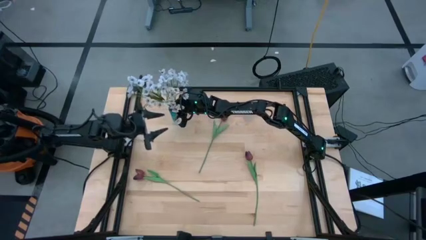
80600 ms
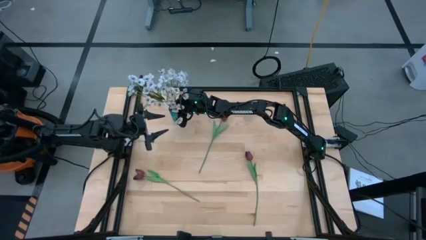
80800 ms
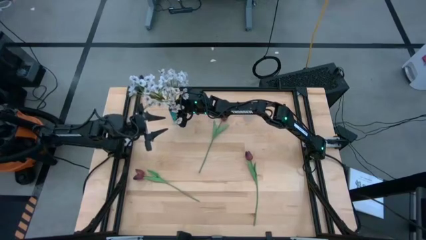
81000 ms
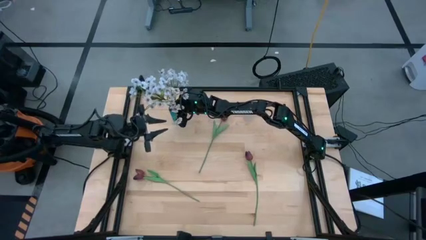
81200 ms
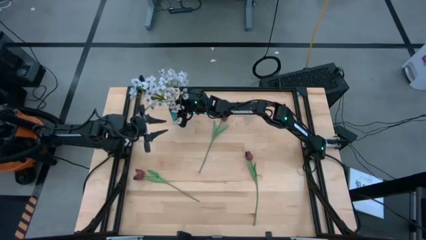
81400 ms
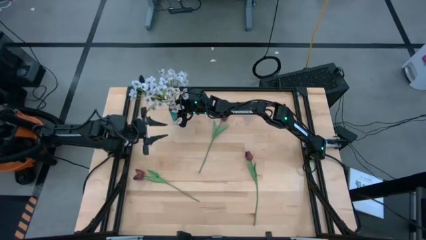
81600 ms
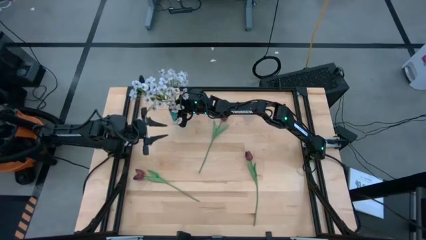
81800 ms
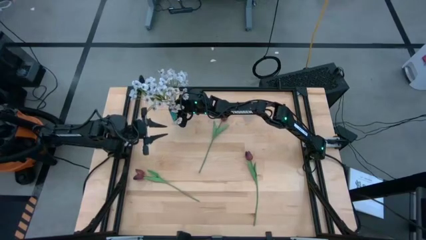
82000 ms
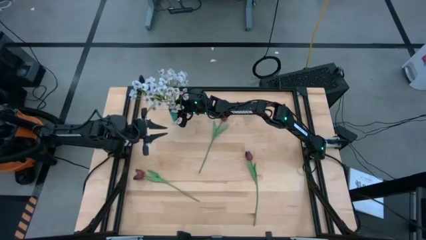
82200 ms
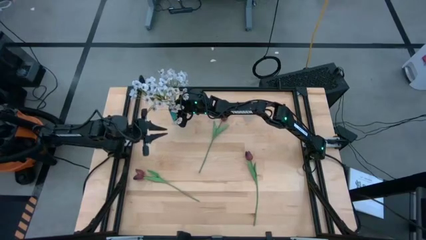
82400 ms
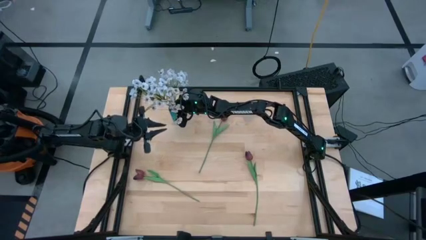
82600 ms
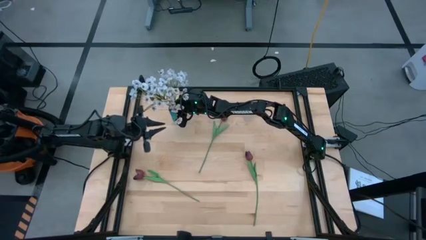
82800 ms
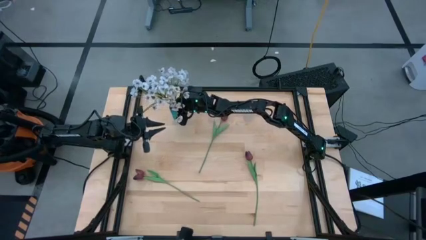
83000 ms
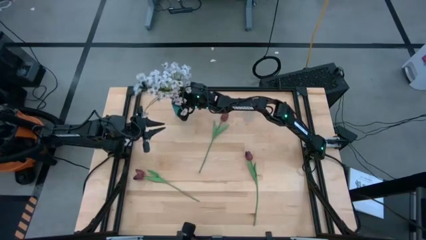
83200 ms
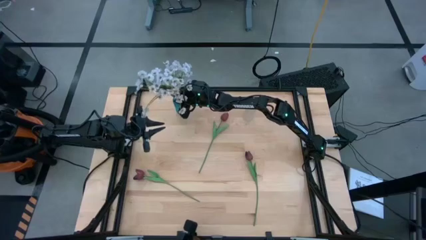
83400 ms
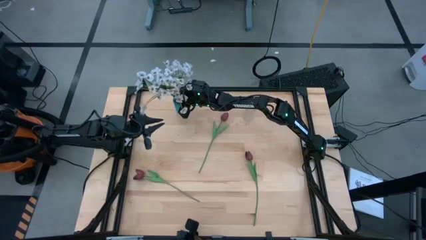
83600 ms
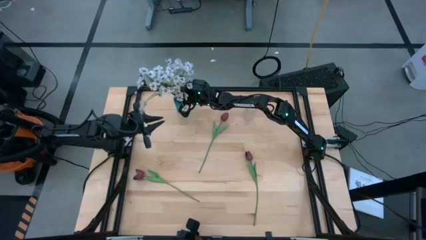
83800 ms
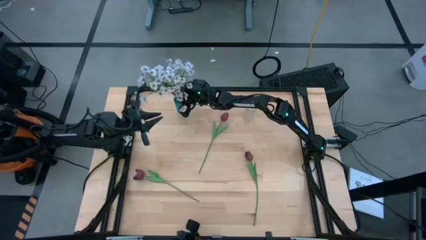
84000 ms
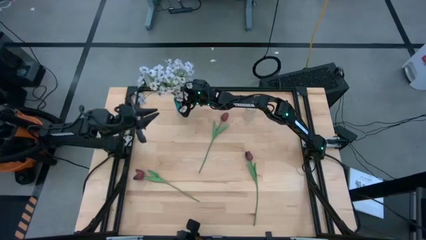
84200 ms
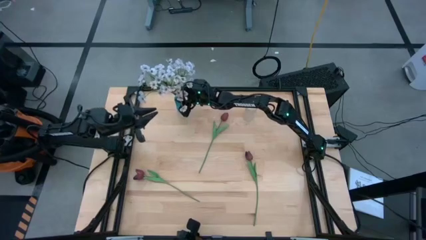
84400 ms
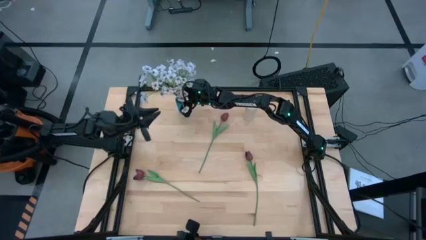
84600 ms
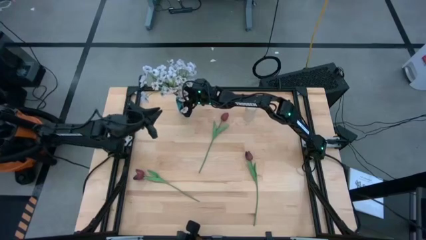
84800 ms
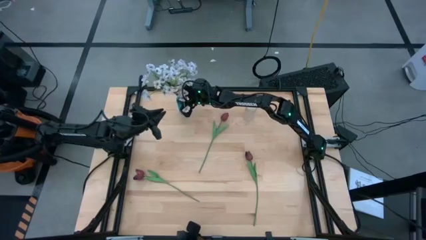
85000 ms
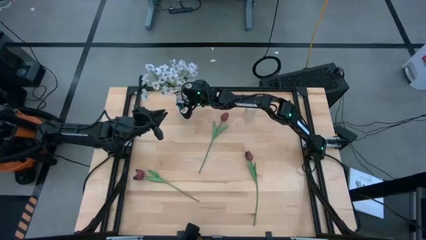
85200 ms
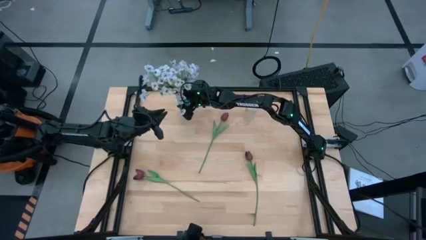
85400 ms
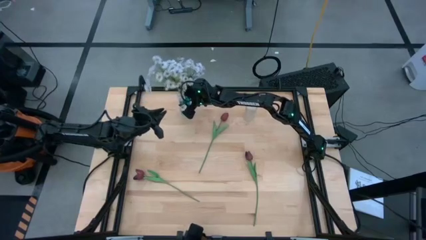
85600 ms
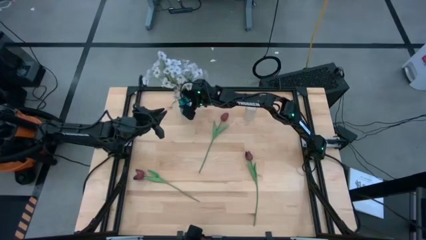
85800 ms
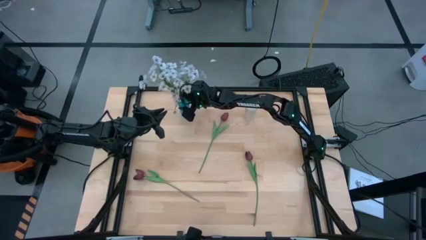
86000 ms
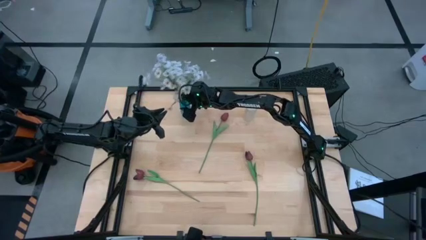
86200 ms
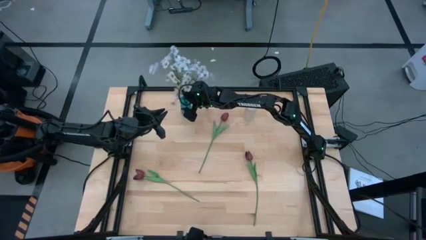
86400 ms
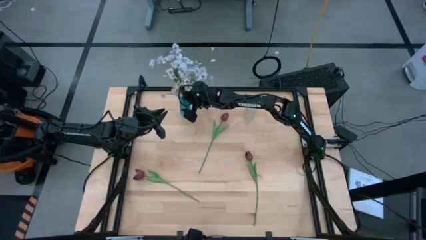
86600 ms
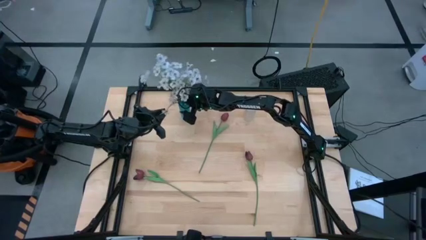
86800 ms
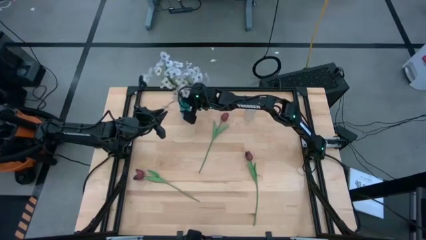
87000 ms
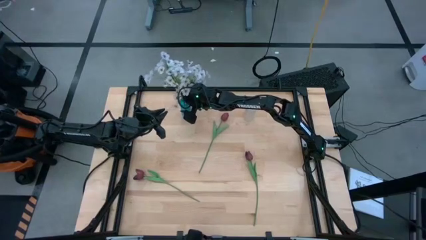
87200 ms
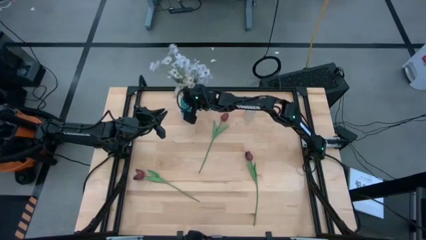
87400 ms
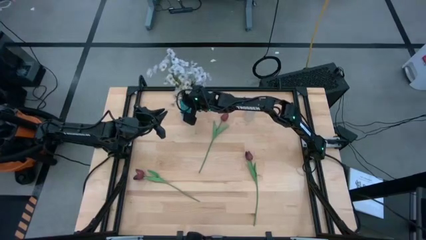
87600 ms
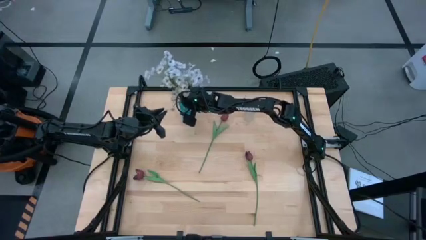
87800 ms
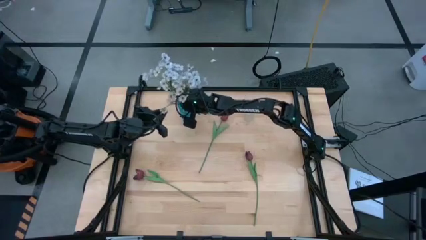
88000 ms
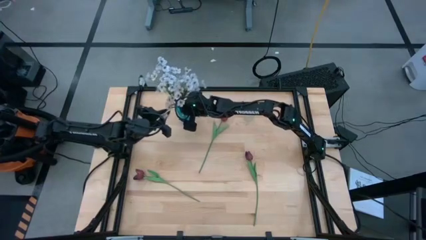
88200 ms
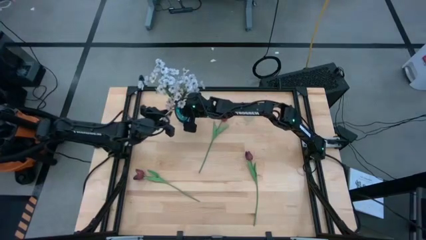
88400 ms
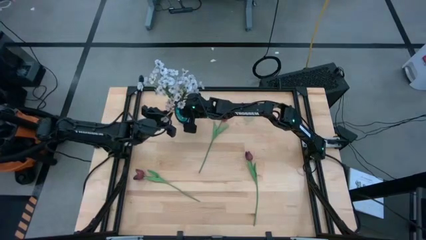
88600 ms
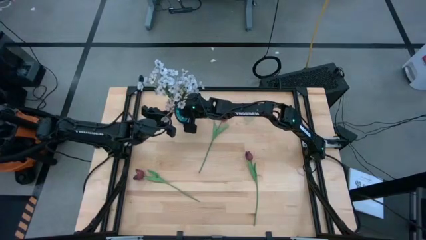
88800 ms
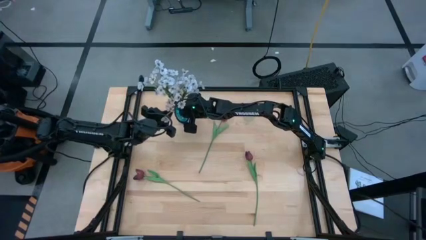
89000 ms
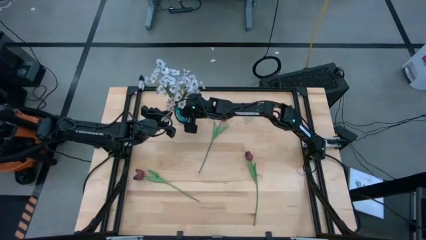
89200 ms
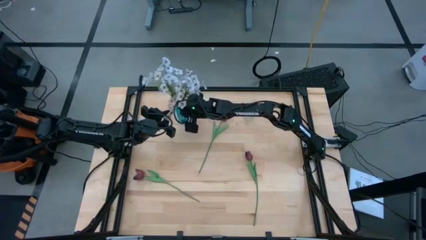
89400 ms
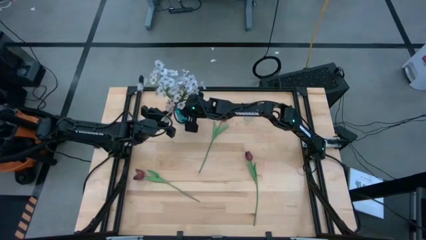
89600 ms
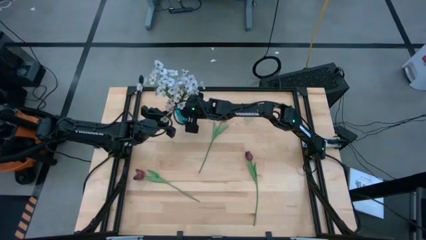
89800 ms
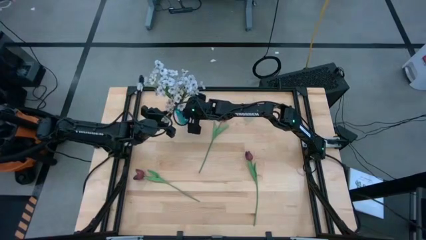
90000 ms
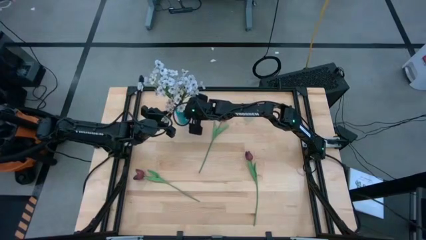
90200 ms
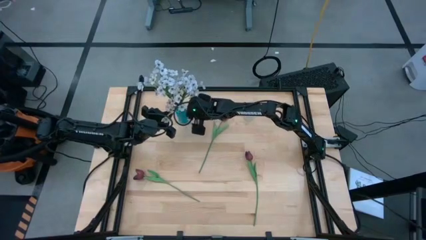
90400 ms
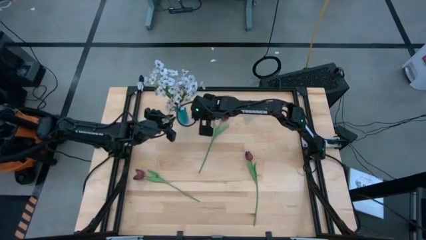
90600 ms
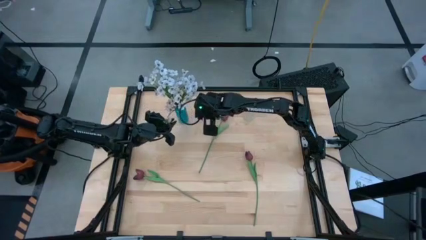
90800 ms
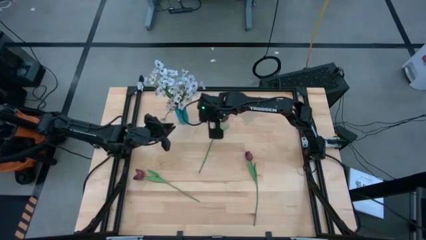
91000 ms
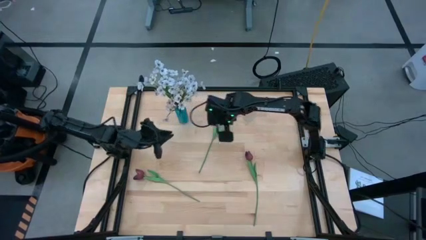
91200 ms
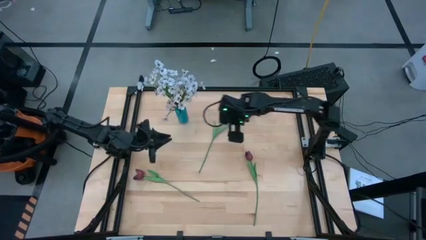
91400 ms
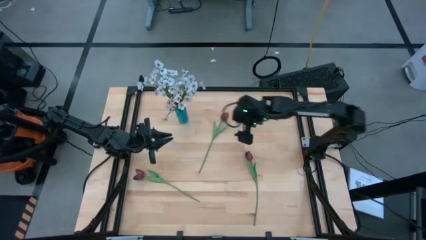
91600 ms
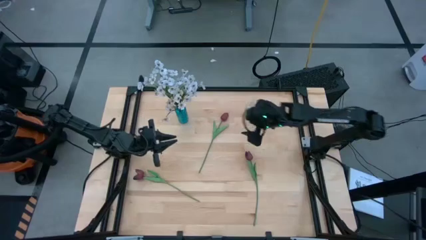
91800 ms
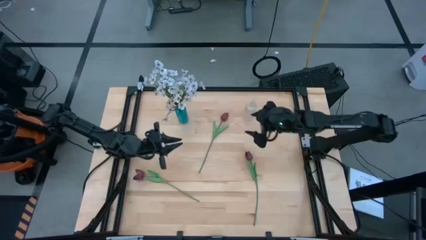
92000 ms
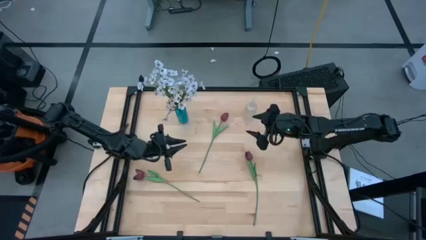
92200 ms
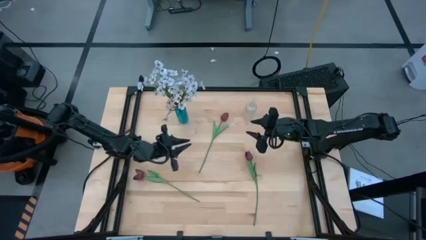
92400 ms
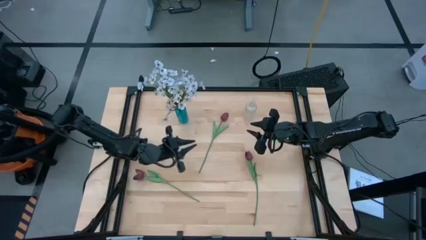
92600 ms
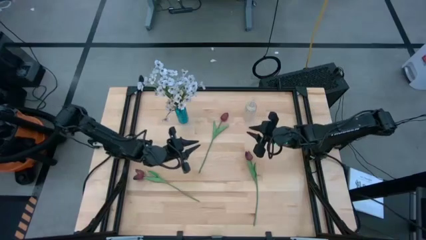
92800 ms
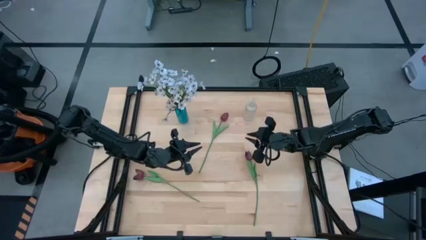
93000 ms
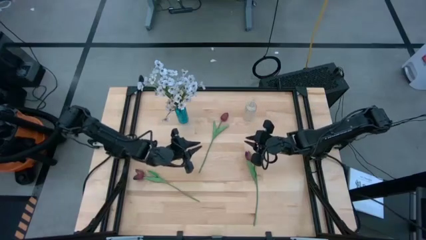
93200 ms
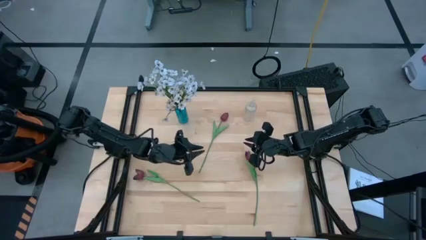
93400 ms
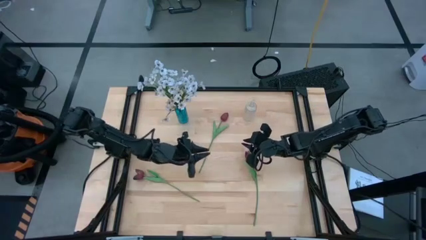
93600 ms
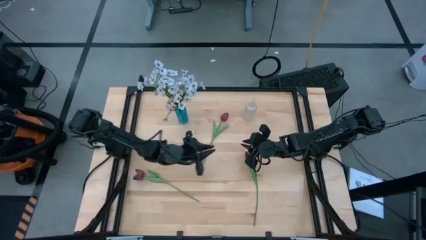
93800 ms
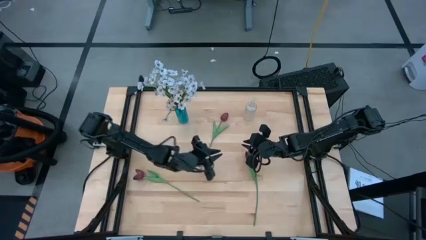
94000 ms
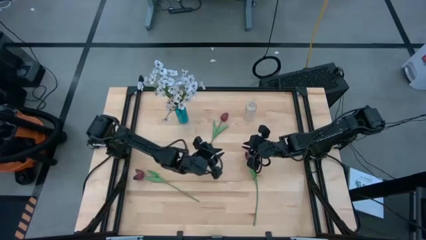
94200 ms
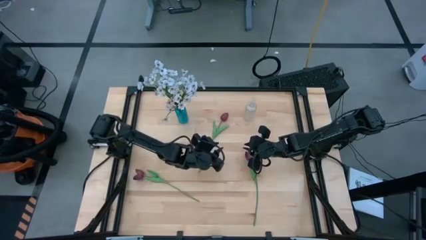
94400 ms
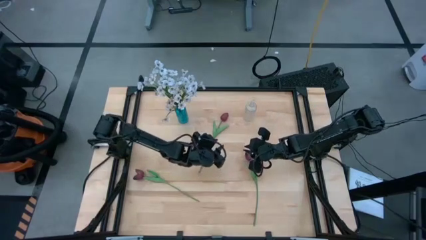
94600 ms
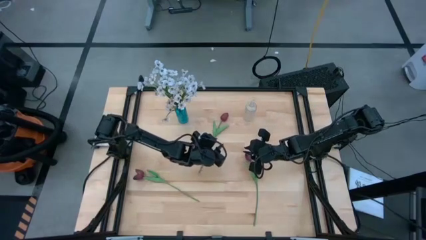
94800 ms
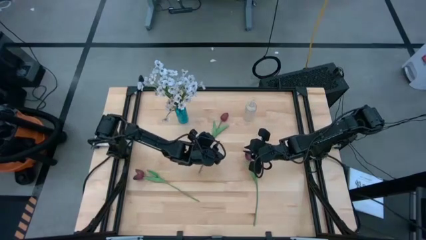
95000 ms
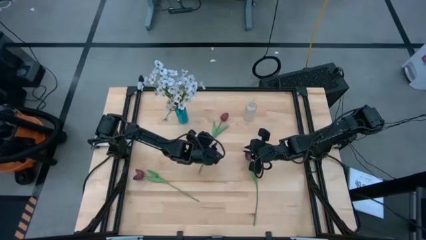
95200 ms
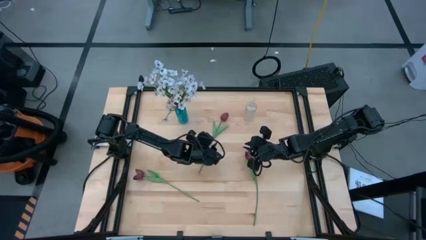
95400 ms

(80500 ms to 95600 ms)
Task: Sort flowers into vase by color
Put the top red tulip into the transparent vase

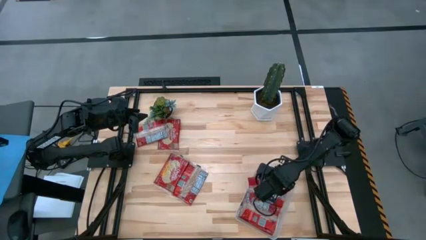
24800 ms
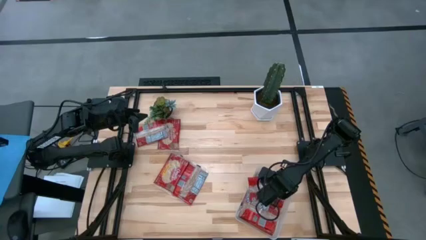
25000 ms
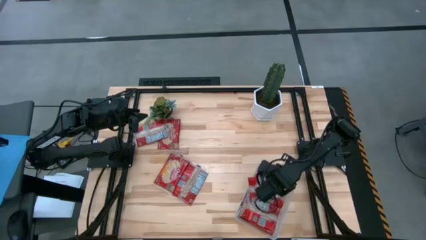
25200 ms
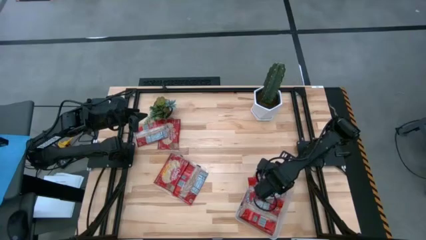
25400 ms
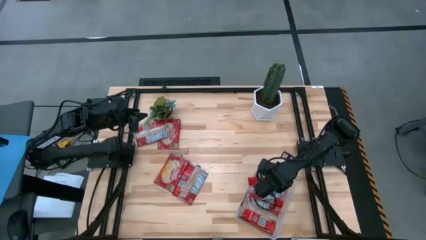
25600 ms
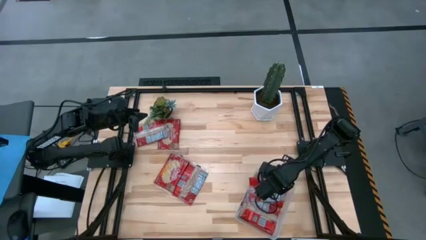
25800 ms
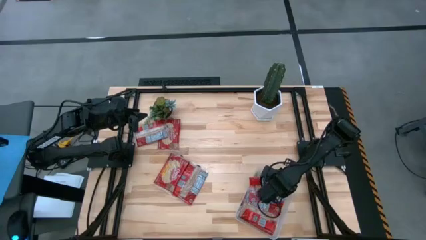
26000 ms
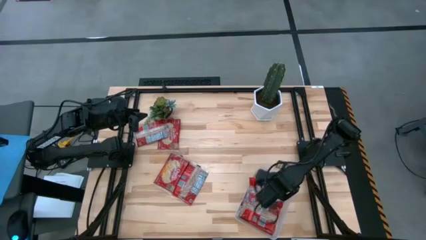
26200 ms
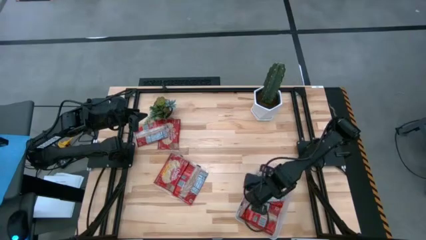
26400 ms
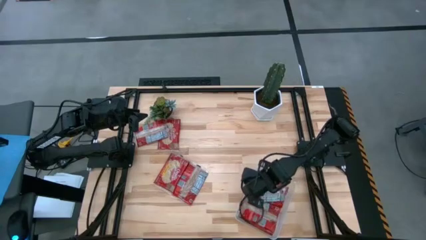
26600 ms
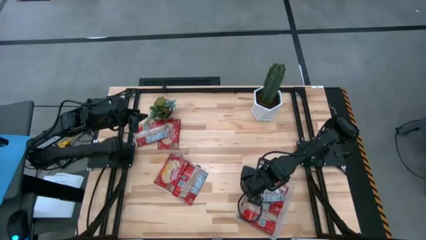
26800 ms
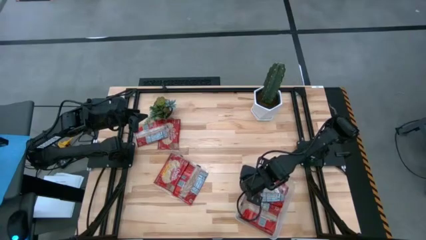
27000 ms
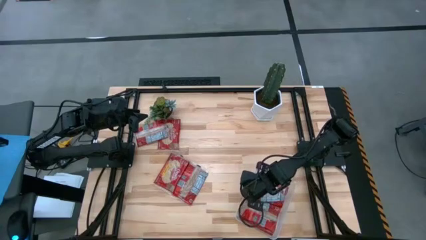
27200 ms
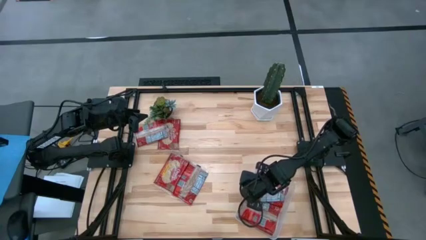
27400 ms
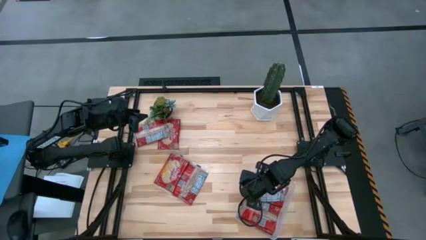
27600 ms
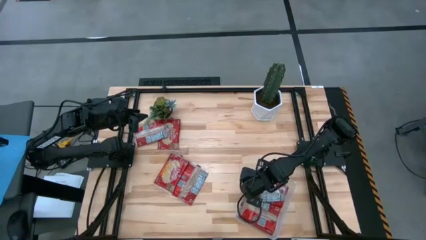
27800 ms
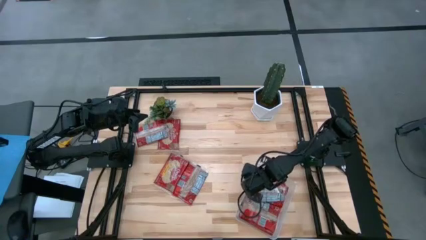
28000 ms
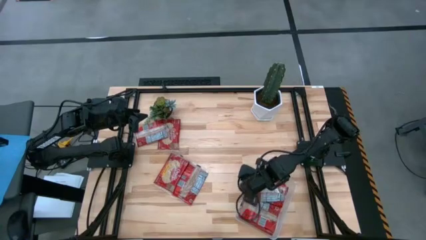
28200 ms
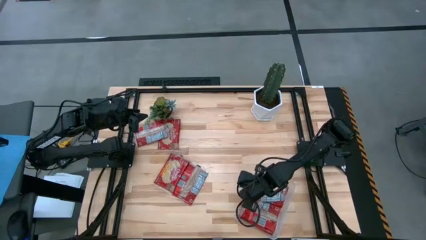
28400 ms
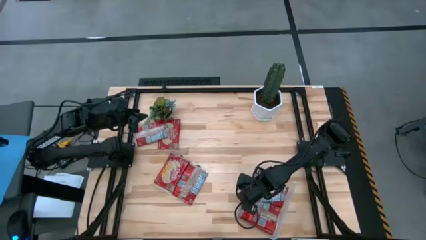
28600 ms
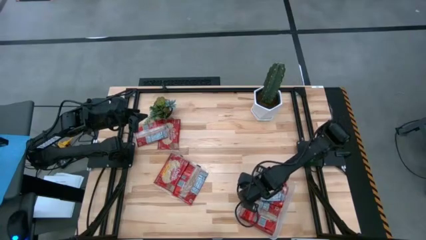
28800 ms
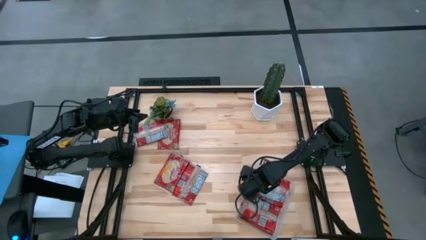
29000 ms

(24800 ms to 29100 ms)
Task: Sort popcorn bags into baskets
Put the red popcorn bag into the transparent bin
